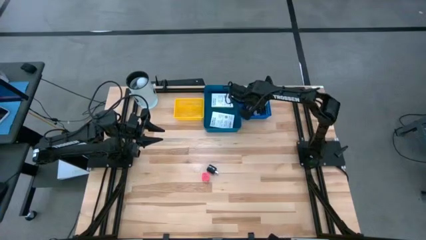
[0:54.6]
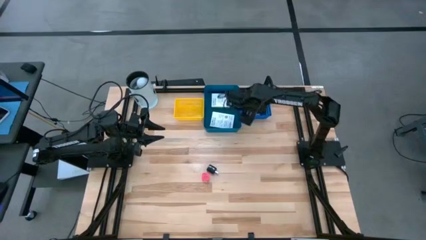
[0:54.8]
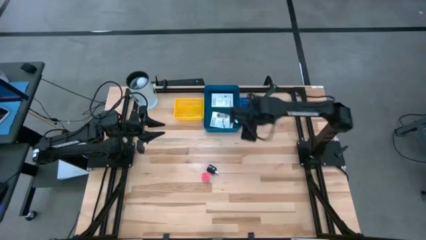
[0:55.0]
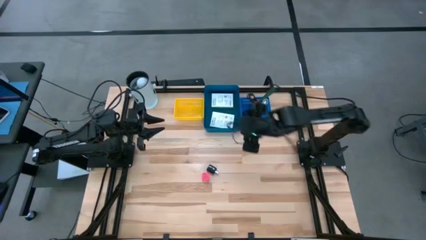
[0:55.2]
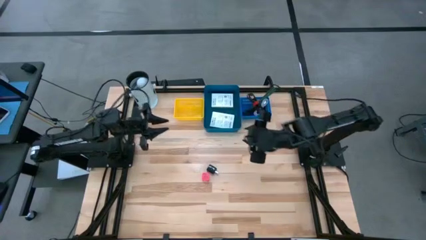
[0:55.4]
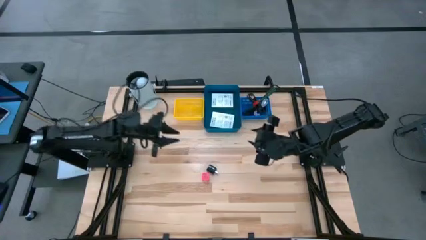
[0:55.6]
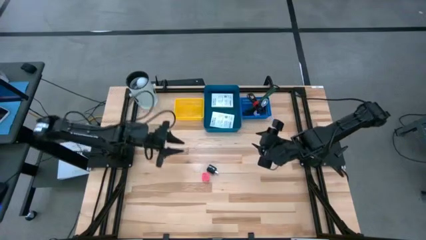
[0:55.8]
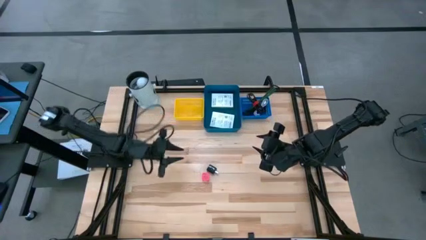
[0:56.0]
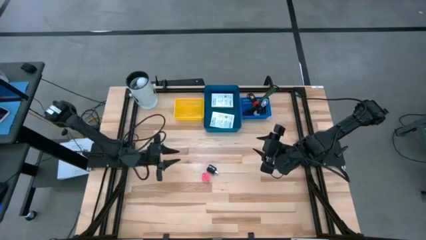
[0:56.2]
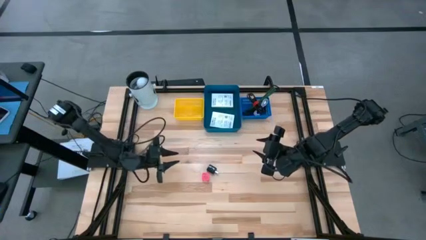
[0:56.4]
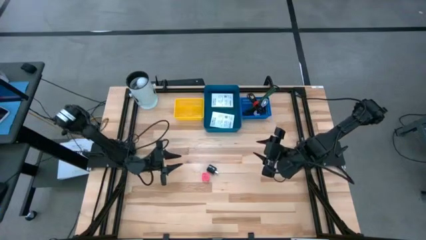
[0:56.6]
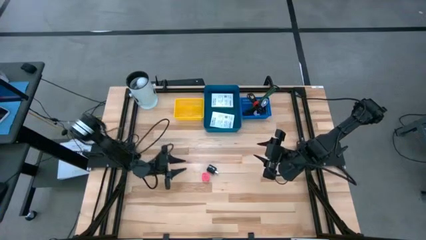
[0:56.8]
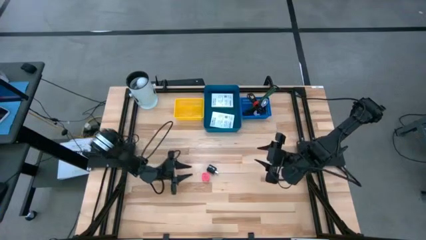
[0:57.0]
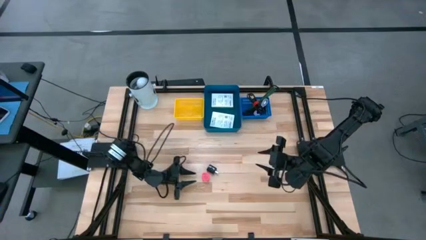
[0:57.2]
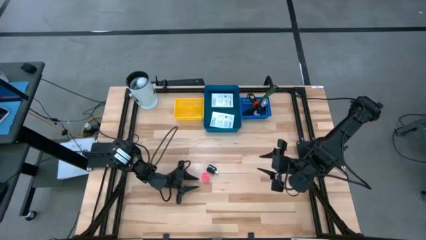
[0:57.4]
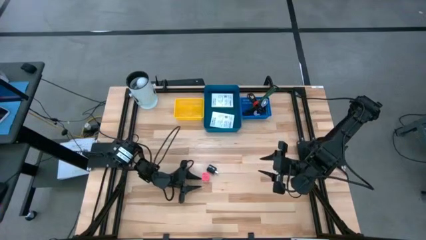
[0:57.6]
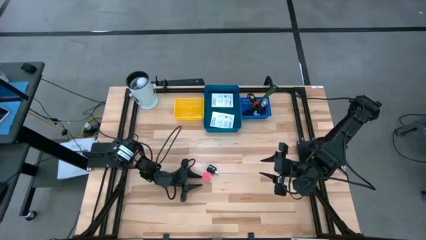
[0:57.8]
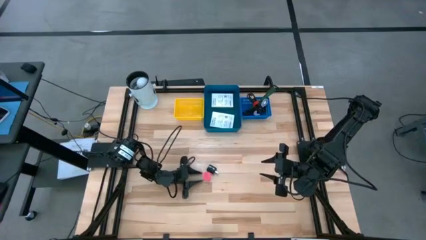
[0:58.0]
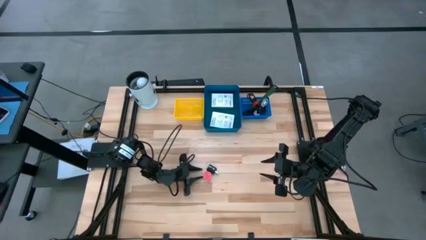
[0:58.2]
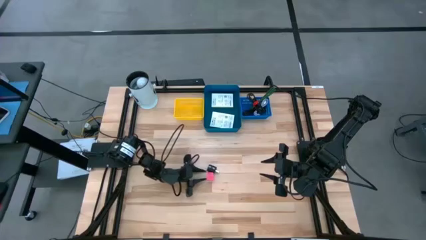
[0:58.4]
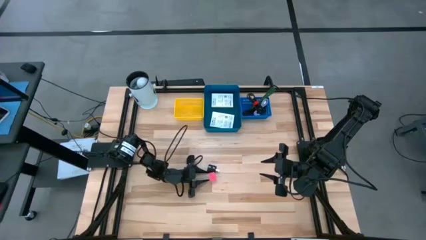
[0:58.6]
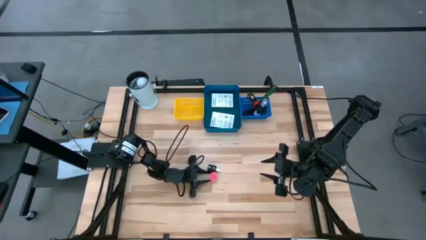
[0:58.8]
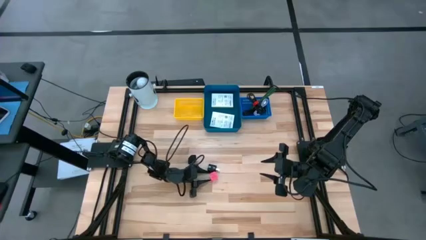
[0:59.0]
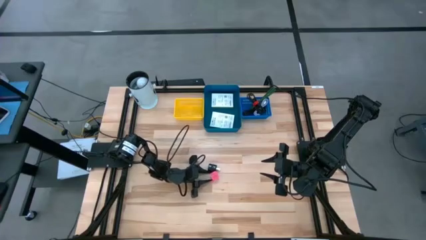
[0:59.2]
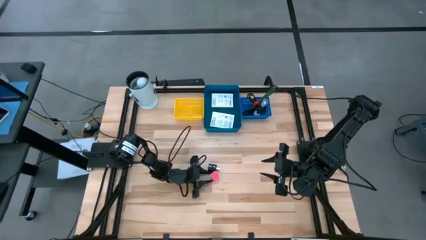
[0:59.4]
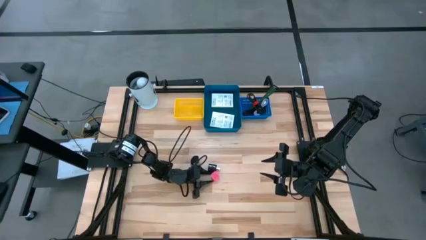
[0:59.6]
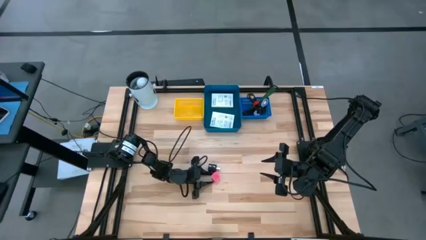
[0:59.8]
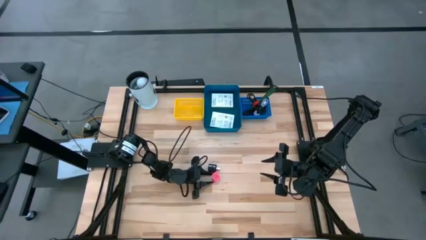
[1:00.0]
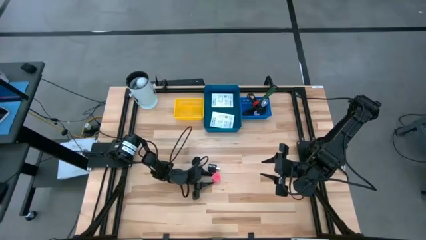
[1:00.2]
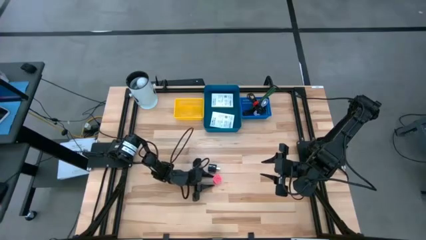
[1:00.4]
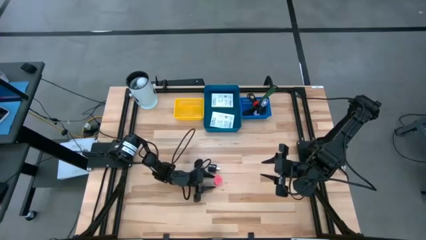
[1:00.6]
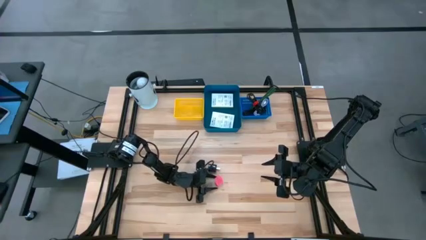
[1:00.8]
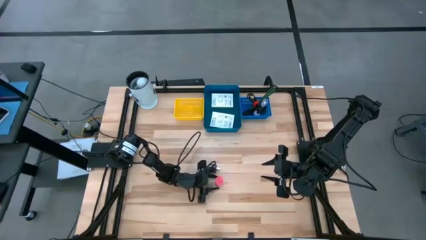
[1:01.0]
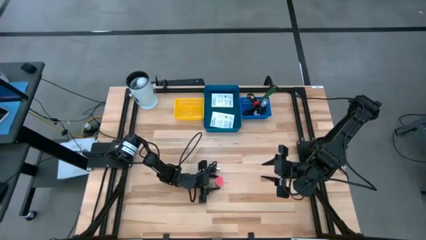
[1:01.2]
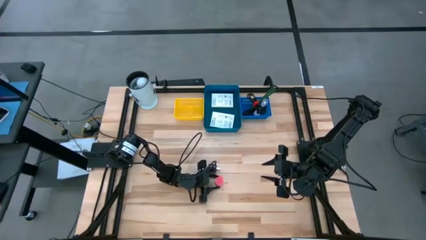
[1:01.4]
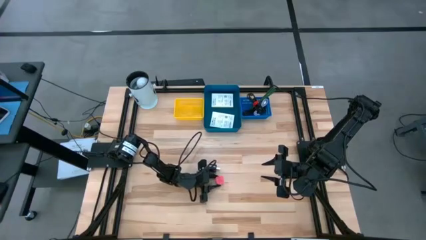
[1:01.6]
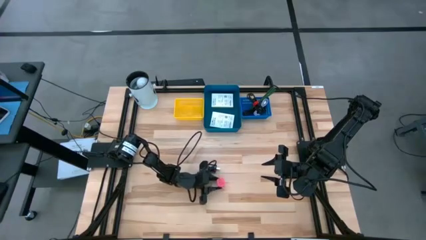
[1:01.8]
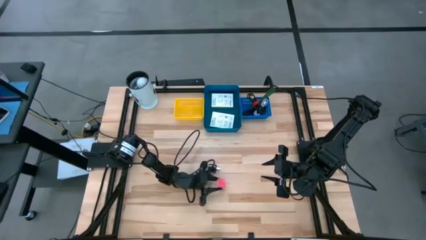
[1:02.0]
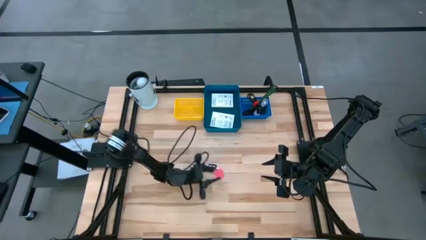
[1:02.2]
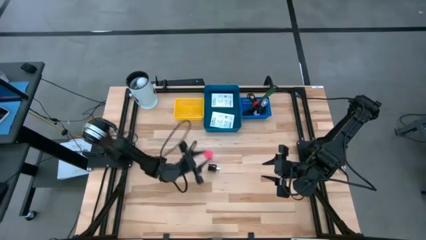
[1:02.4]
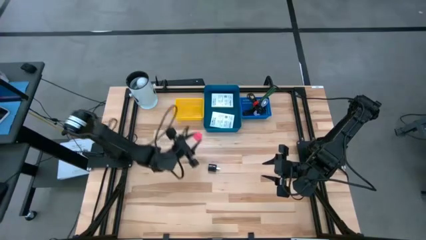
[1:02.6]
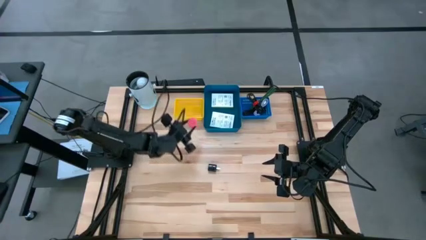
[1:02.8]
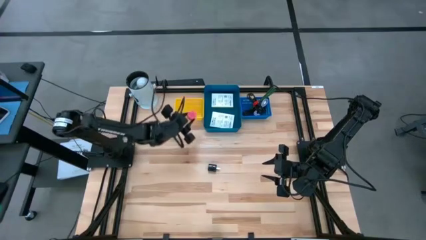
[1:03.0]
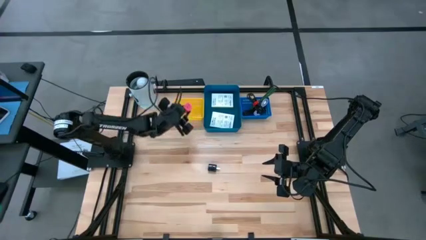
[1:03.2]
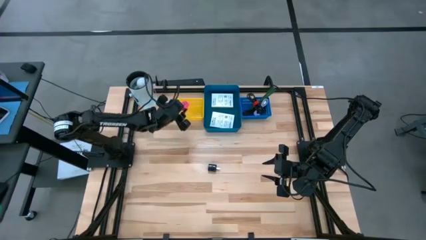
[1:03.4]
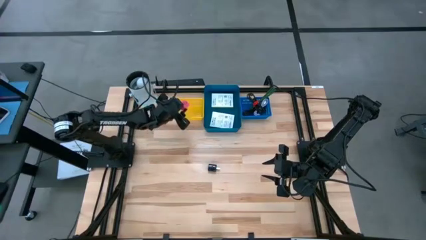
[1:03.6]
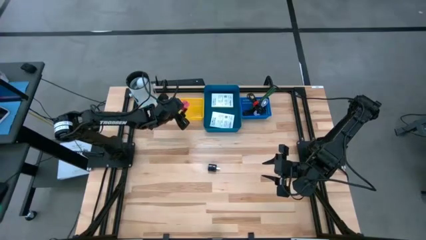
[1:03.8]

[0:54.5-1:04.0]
Task: Pick and place items into bin
Put the pink charger adapter into the yellow bin

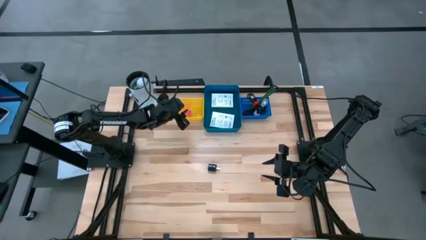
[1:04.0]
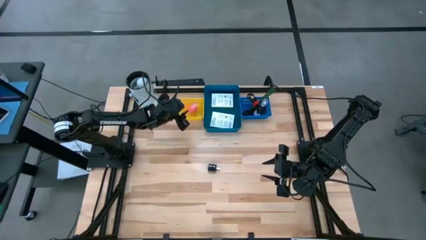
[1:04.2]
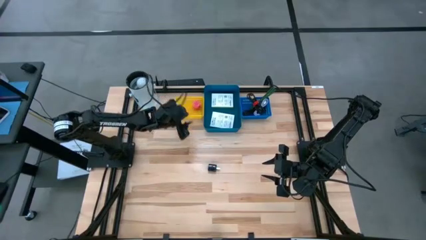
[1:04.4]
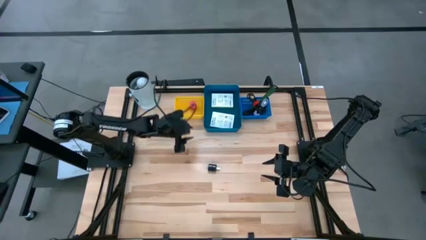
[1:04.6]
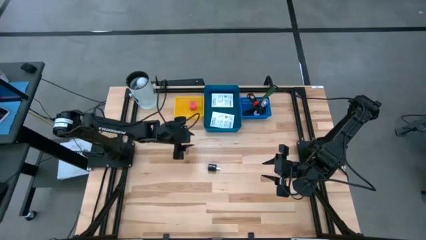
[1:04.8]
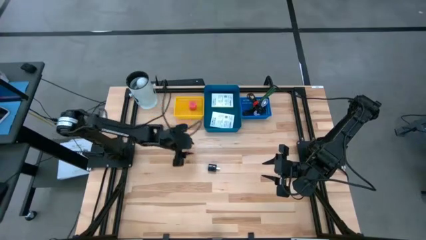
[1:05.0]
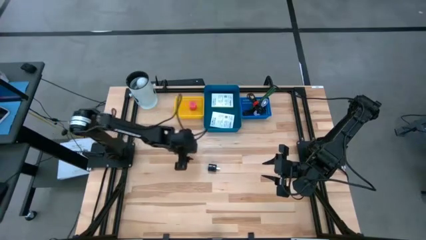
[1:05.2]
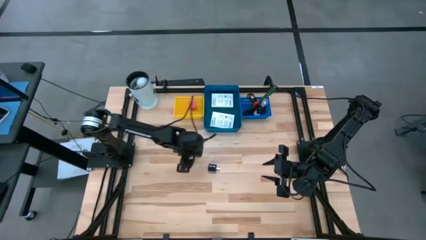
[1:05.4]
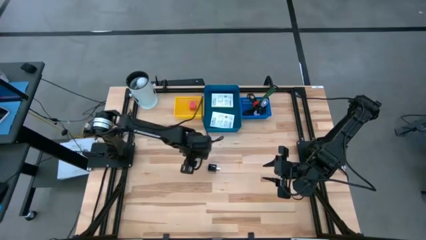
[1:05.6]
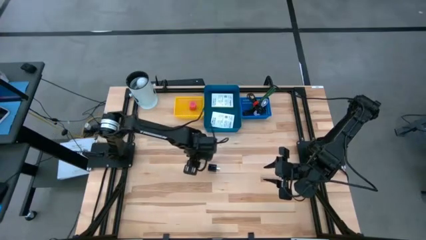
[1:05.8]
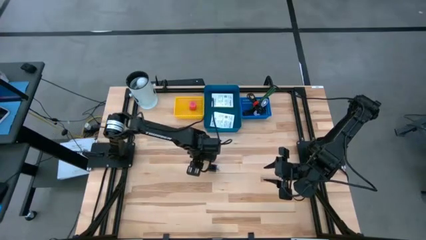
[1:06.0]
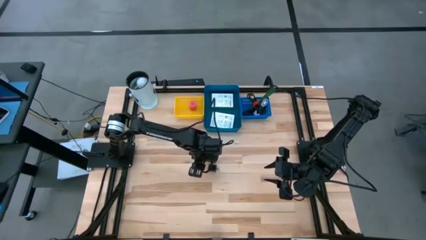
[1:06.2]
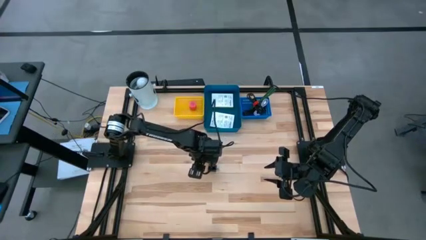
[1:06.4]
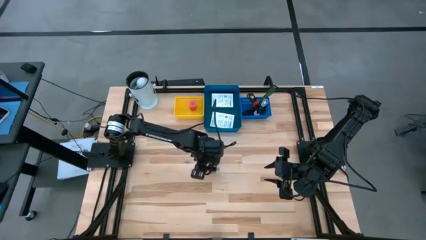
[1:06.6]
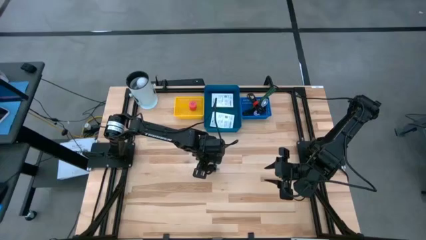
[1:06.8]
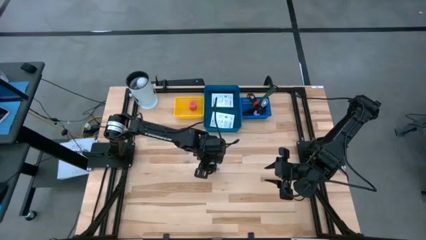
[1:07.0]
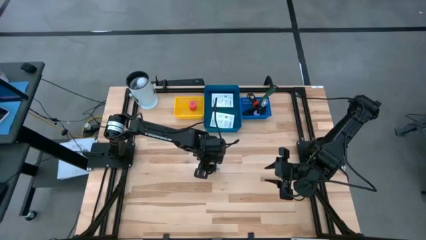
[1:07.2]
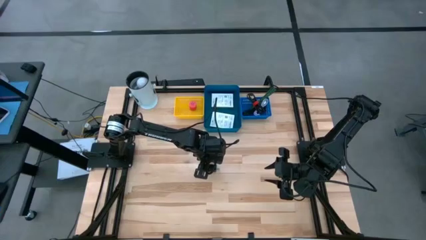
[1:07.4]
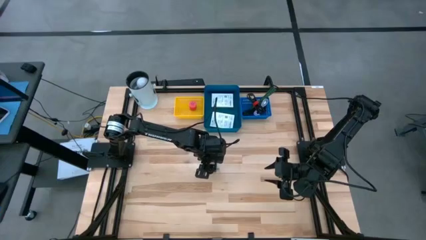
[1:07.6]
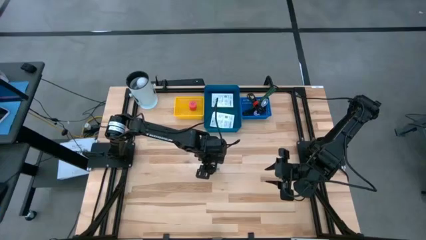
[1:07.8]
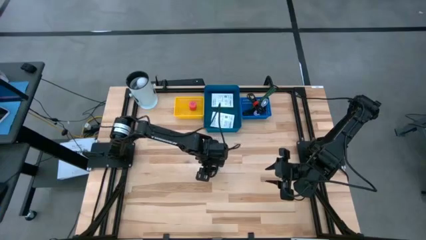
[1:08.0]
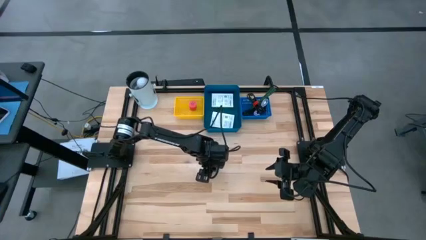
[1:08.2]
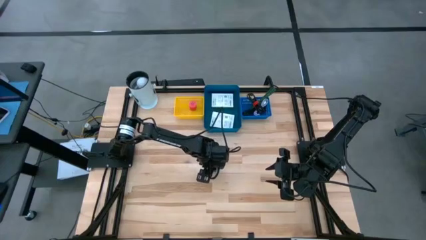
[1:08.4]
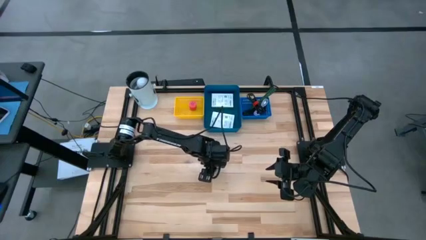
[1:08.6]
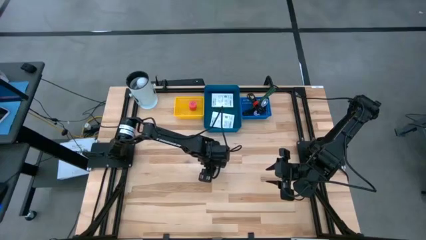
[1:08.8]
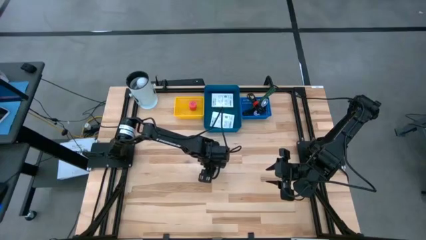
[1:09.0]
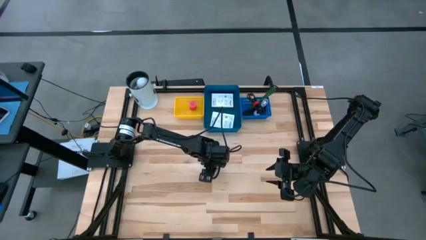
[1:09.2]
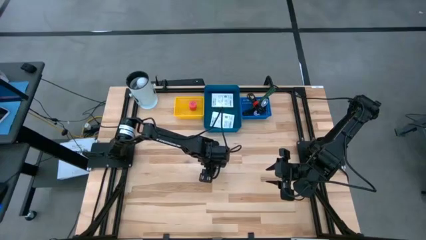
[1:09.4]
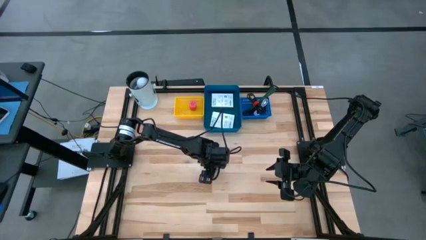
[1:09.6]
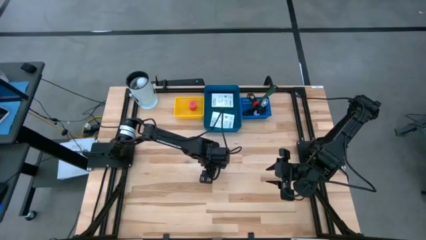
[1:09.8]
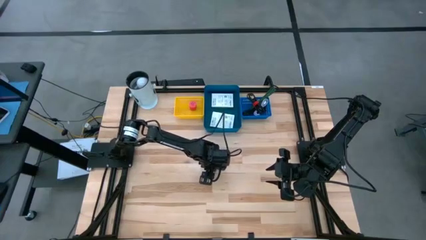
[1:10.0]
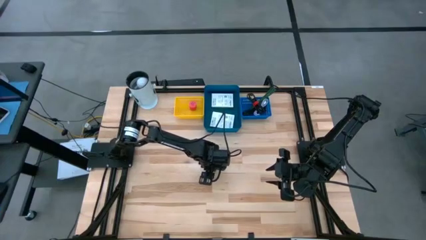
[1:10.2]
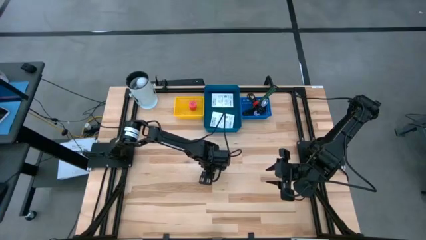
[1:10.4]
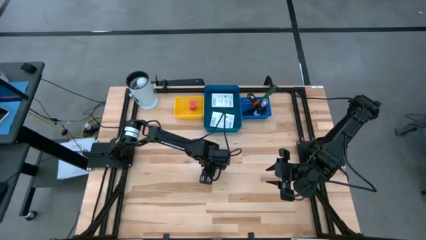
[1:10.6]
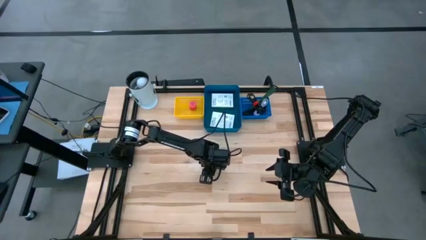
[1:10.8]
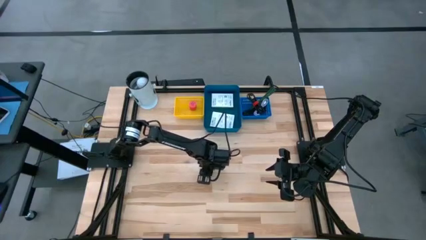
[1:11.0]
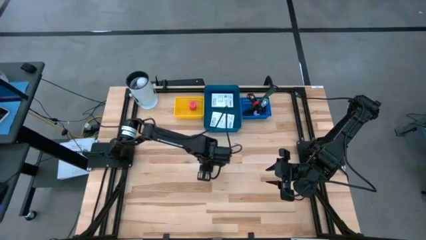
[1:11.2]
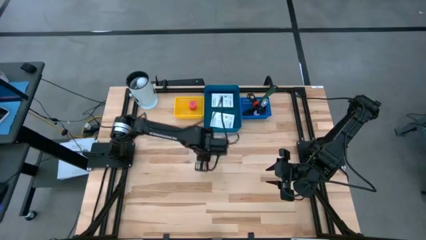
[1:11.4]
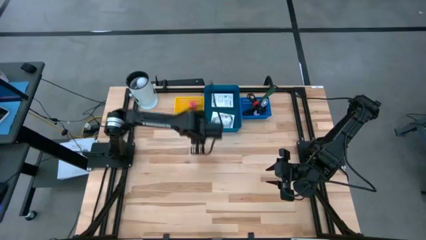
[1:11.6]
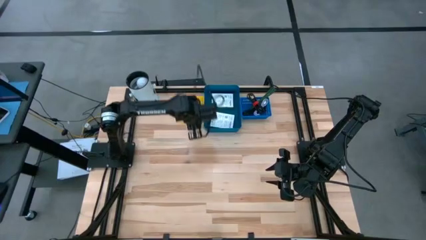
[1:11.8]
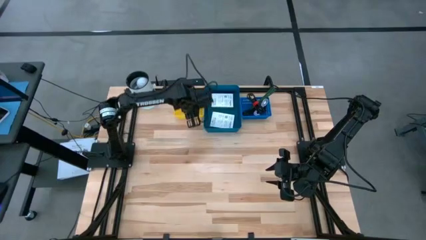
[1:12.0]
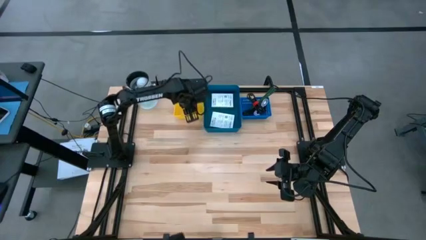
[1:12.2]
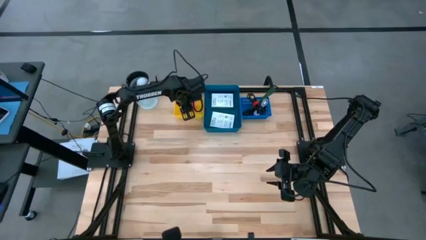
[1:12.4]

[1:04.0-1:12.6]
Put the black charger adapter into the yellow bin
